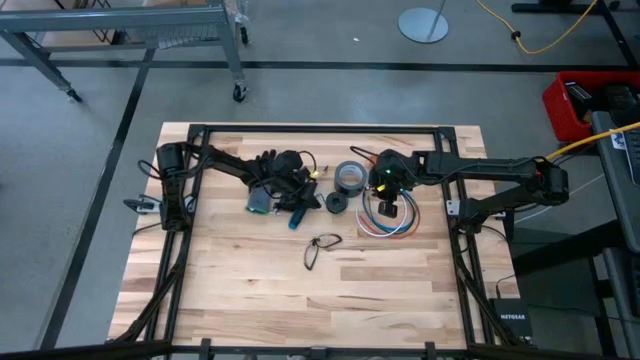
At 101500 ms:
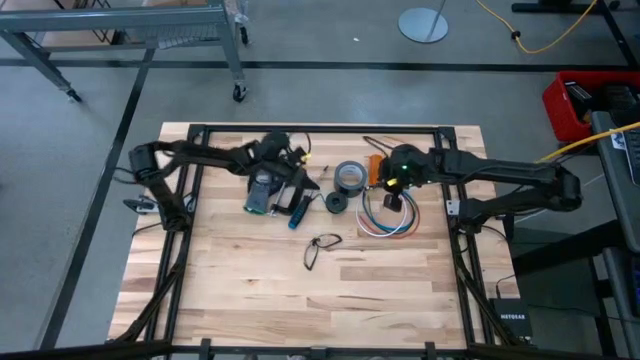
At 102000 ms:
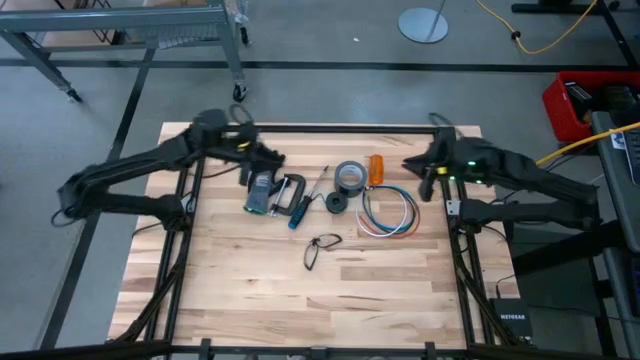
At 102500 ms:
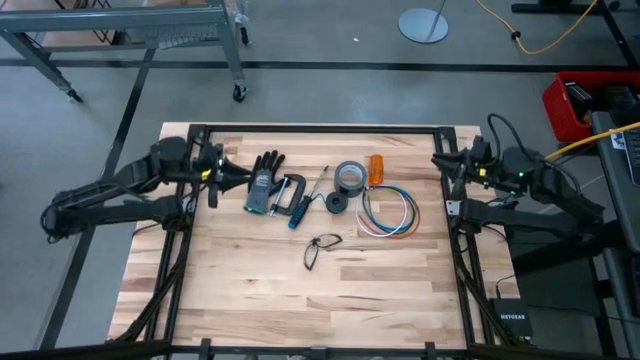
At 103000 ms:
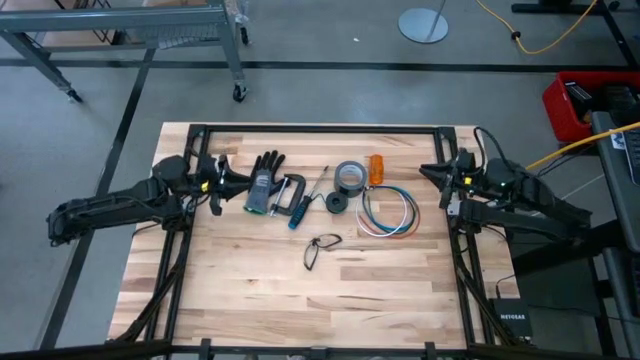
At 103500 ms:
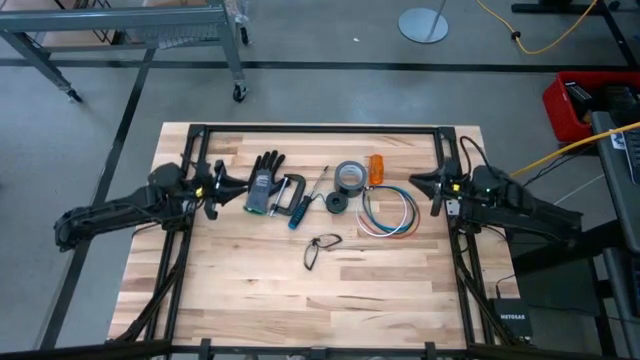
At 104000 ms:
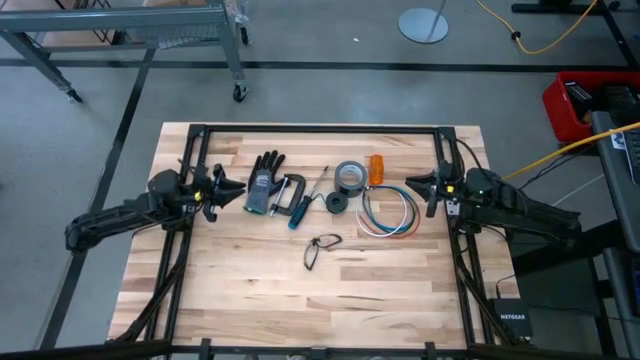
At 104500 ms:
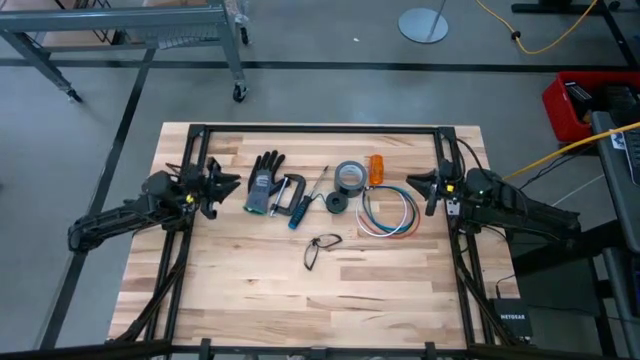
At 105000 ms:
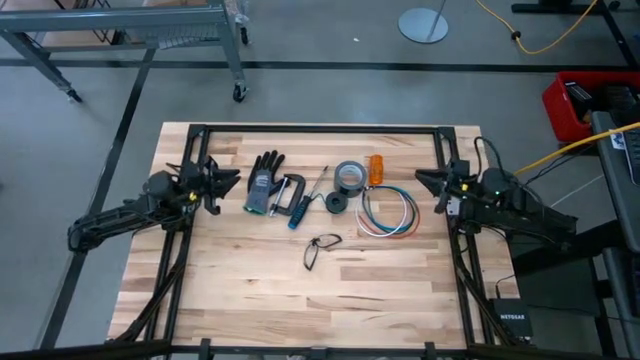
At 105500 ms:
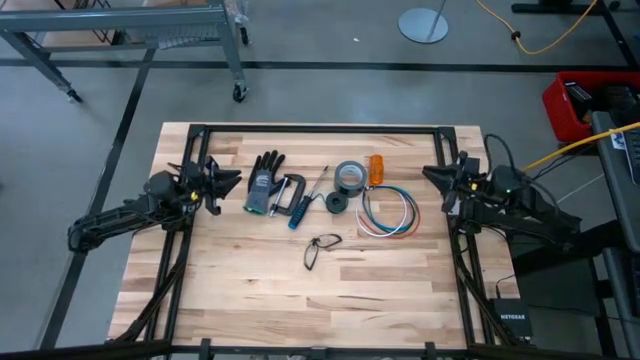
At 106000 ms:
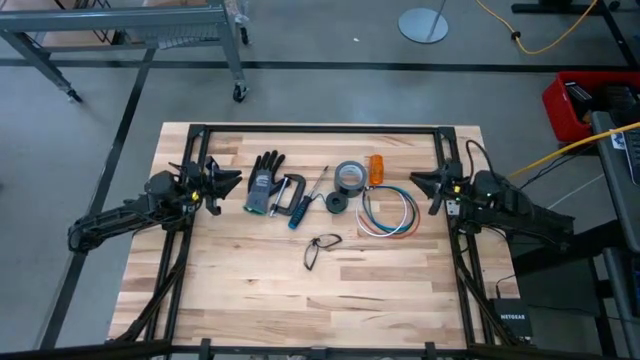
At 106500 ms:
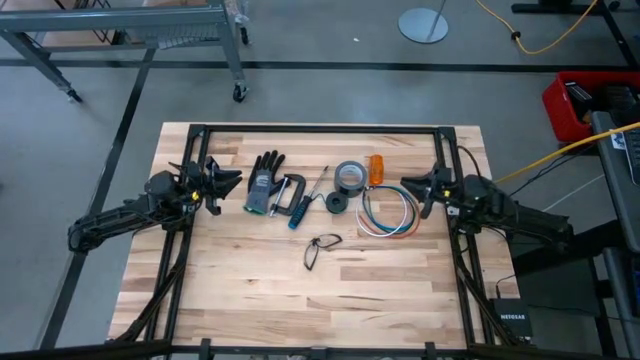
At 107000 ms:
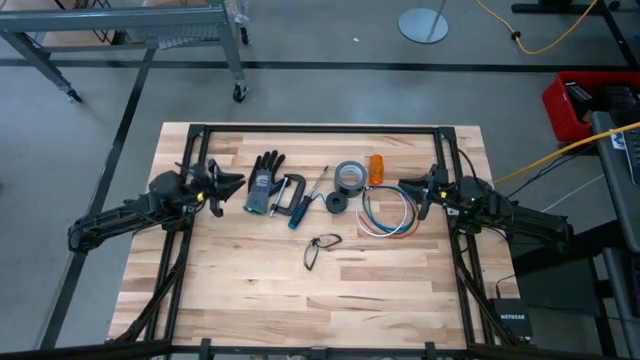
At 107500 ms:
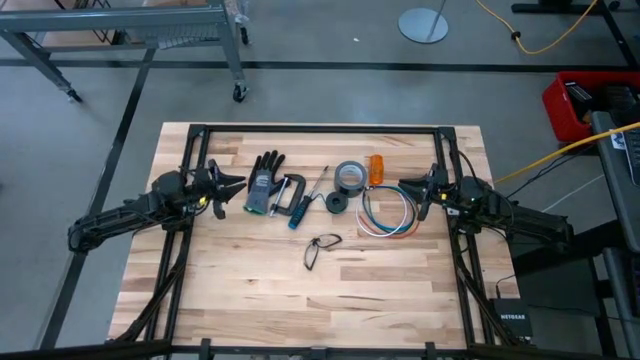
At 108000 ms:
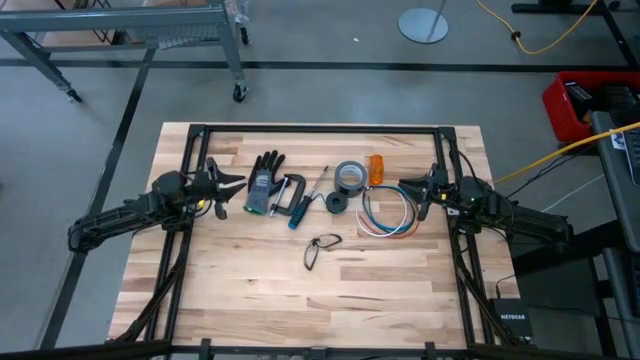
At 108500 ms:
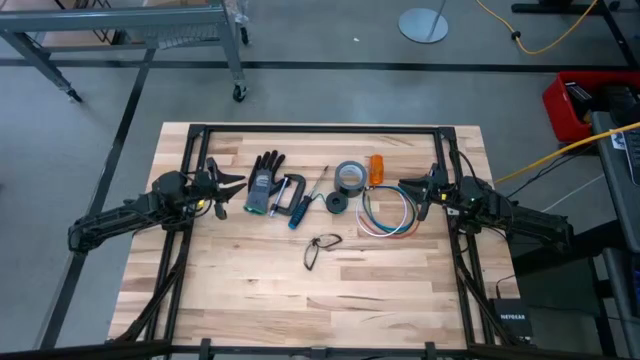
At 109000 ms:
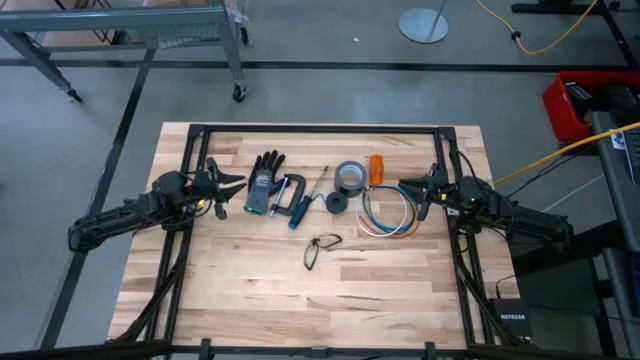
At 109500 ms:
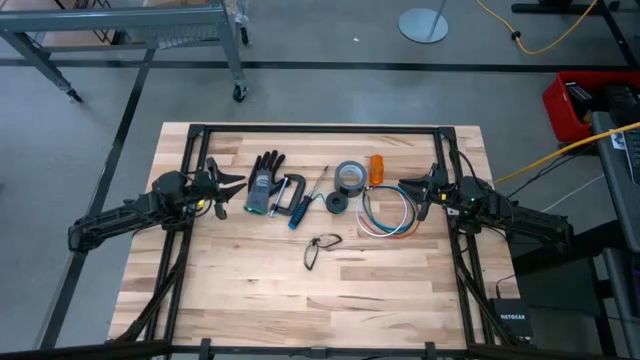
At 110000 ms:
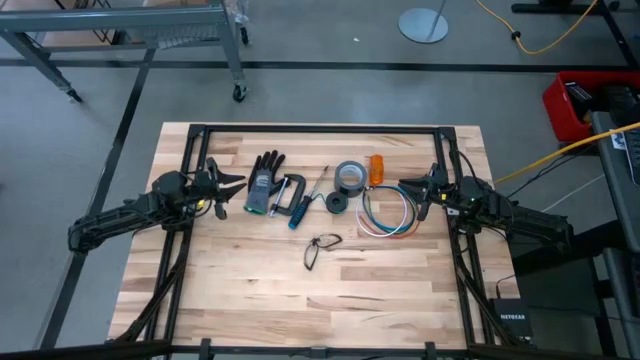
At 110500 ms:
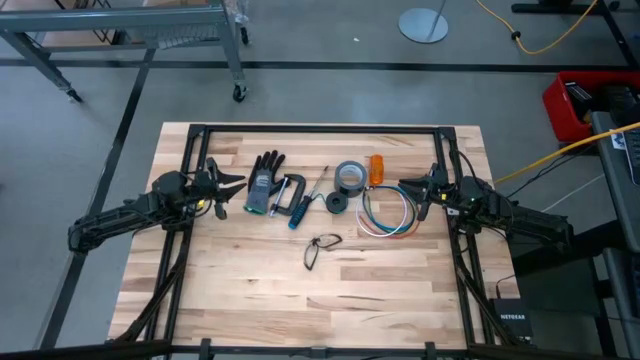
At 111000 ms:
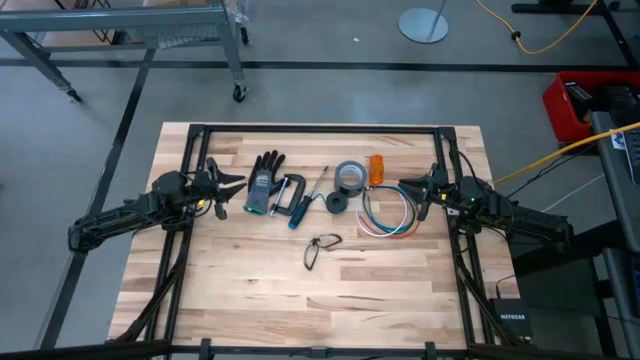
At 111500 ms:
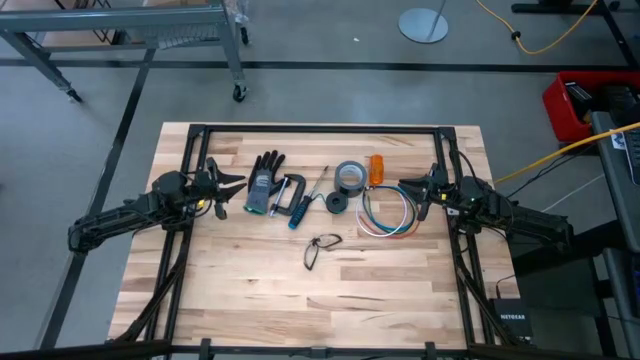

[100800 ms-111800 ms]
Task: Coil cords
Return to Home Position

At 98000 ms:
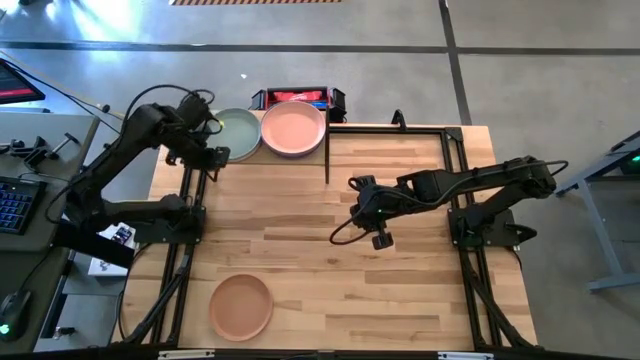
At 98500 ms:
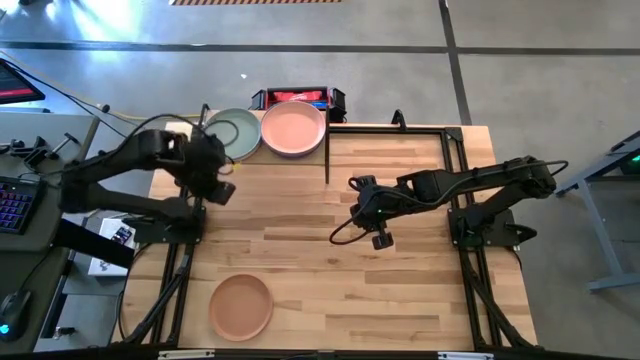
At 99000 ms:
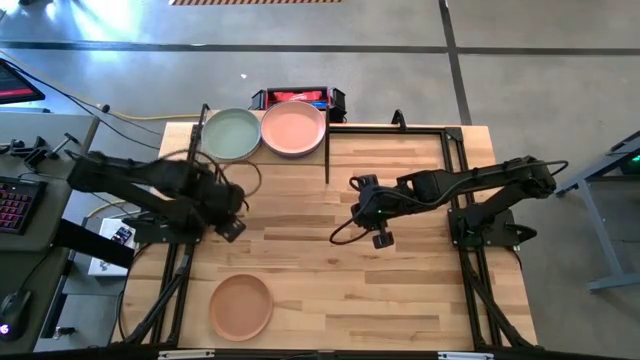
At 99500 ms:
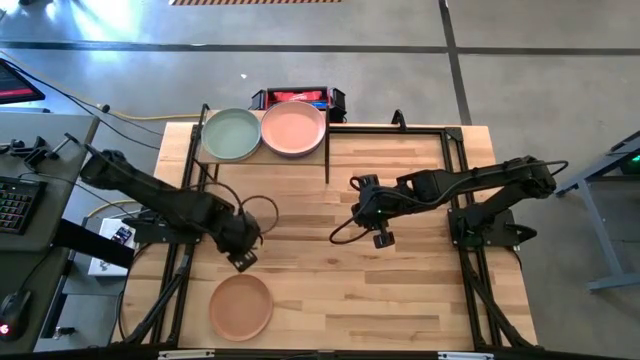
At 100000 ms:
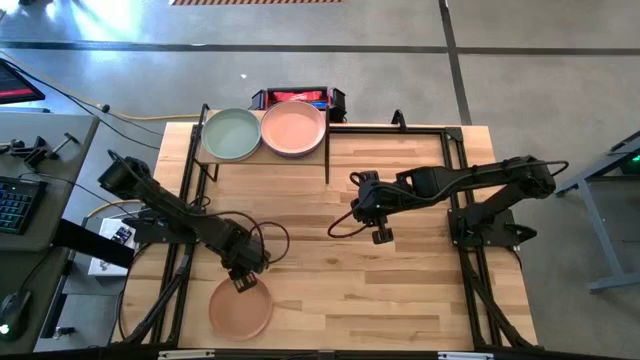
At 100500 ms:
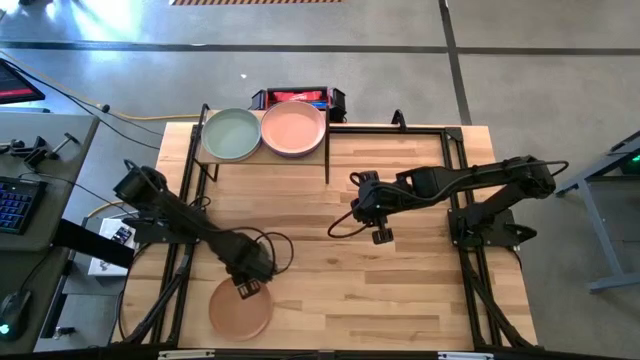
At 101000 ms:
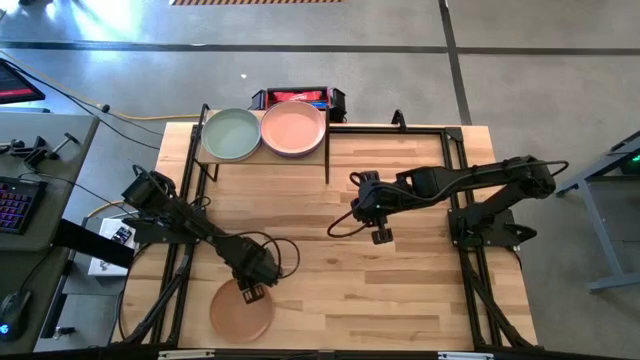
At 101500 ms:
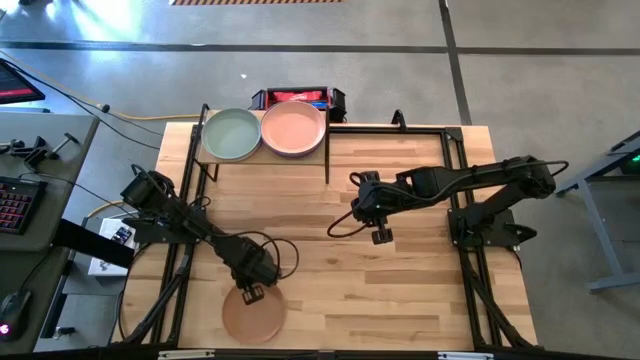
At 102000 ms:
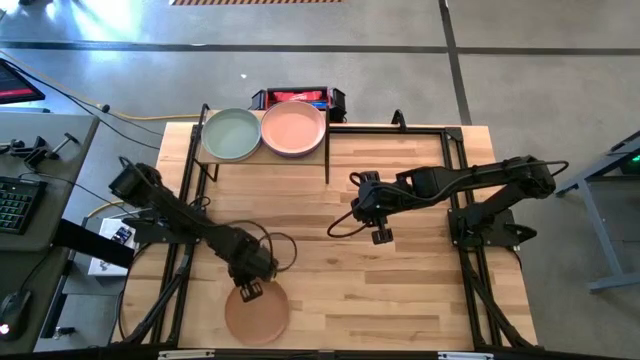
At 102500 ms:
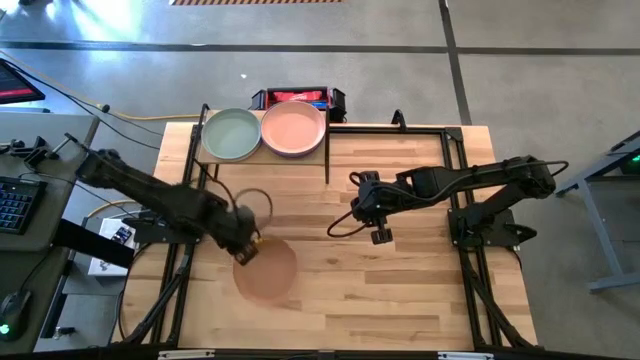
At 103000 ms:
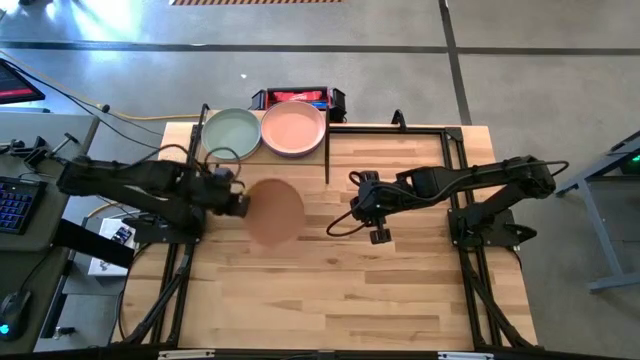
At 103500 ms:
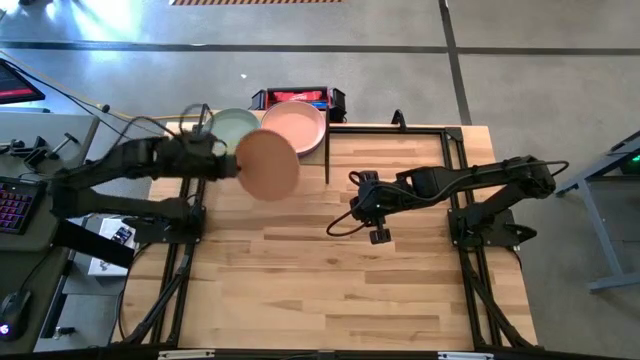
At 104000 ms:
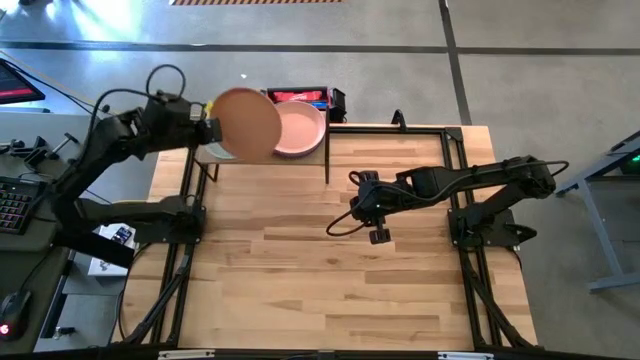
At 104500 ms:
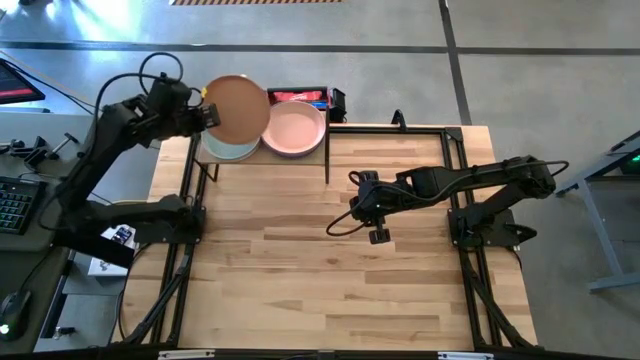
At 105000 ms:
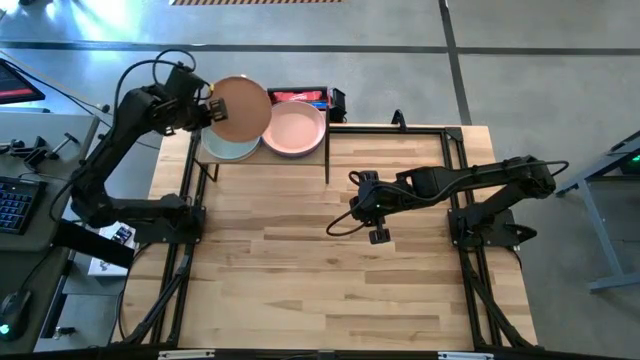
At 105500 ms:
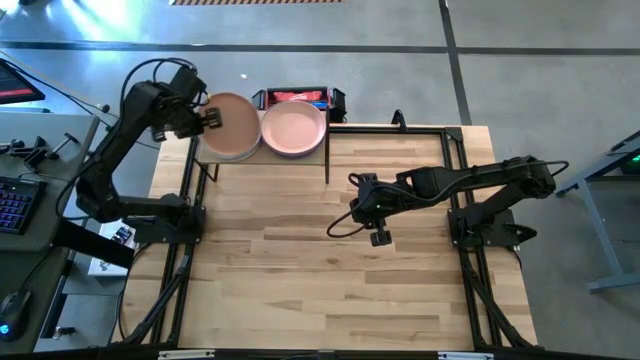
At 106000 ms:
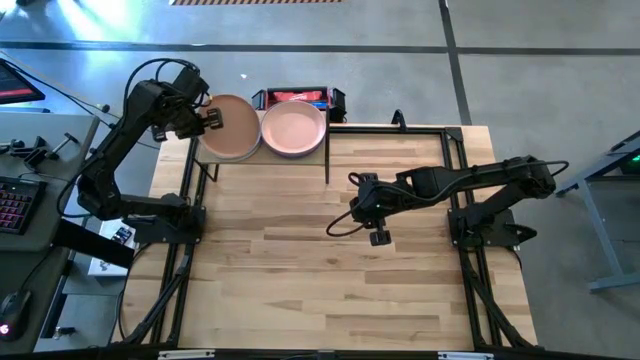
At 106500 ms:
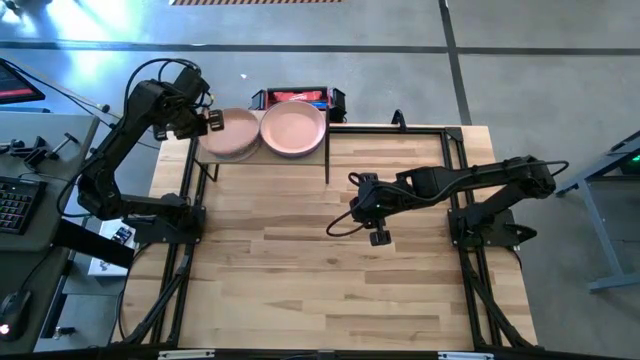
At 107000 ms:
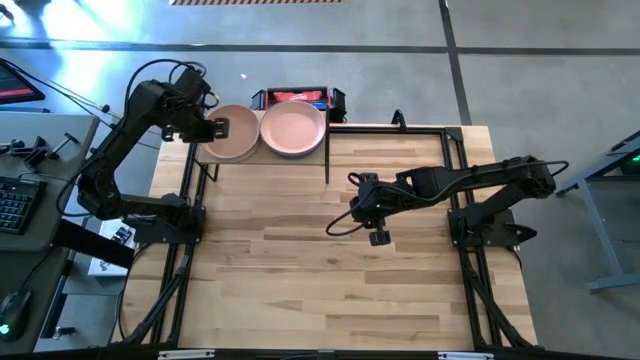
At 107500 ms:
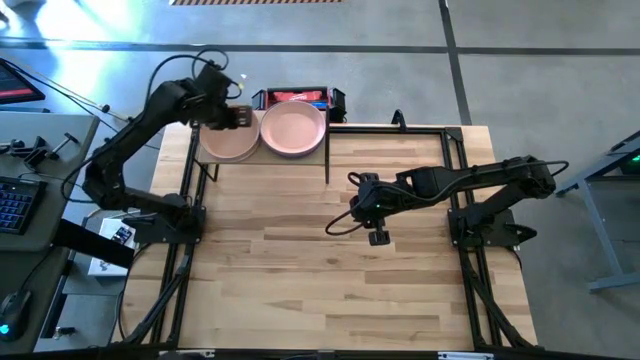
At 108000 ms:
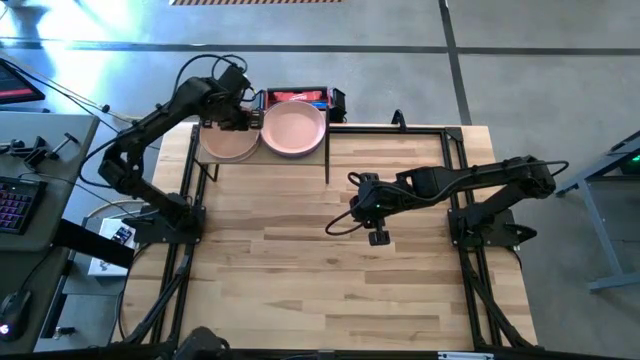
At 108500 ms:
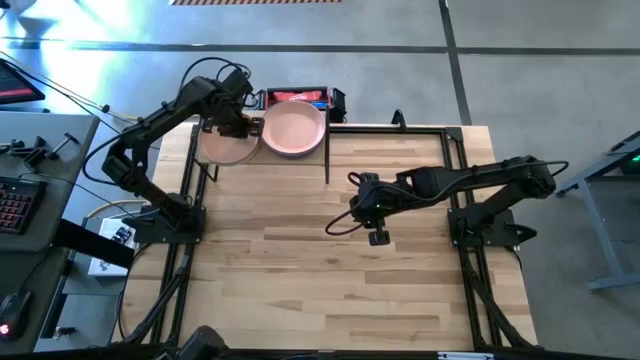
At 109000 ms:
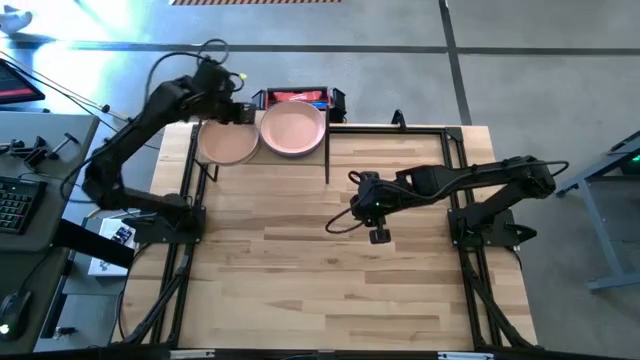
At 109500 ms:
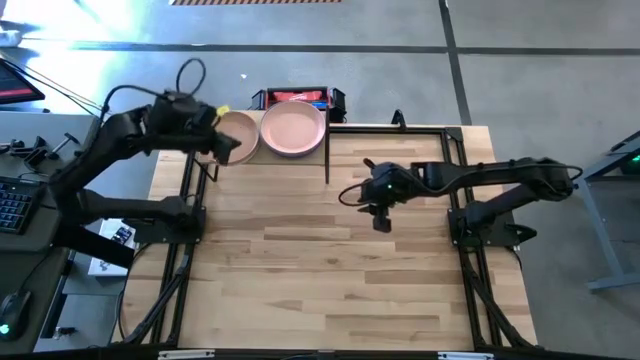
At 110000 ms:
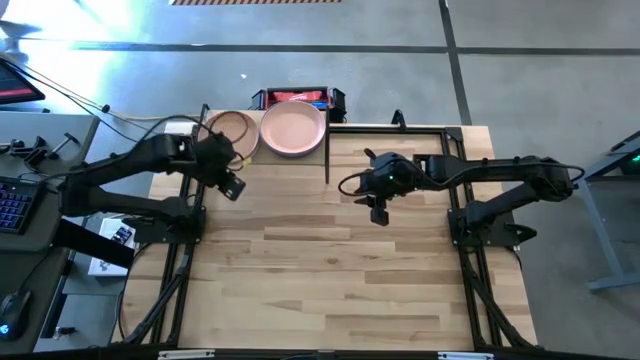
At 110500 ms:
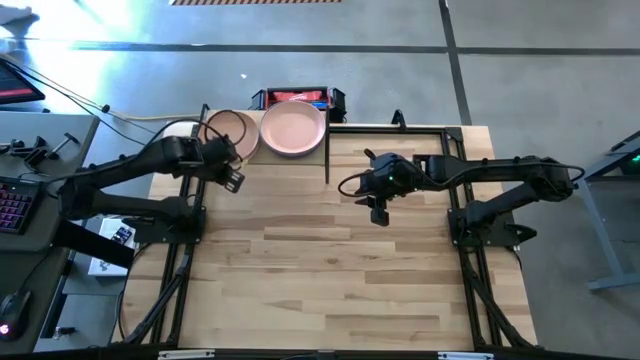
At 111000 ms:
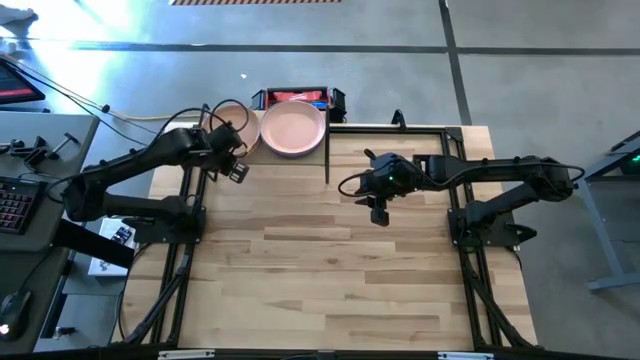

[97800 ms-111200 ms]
Task: Place and stack plates onto a shelf
Stack the brown plate on top of the light blue plate on the shelf
